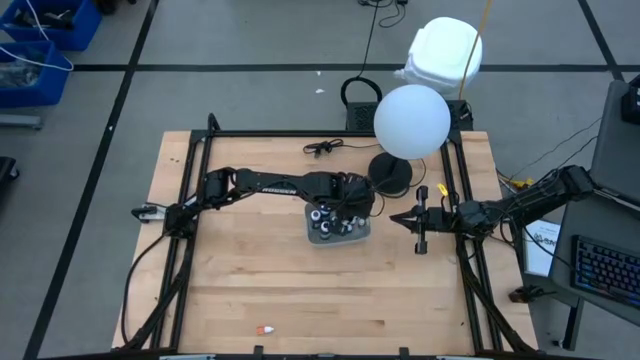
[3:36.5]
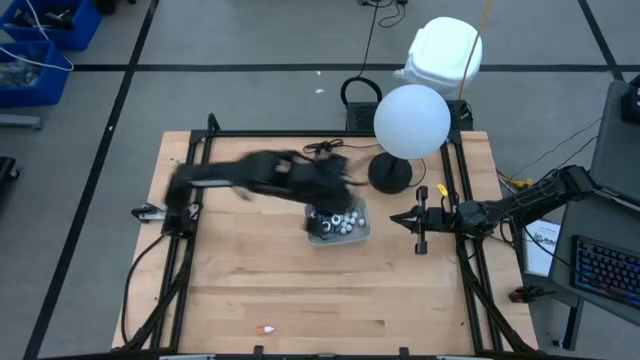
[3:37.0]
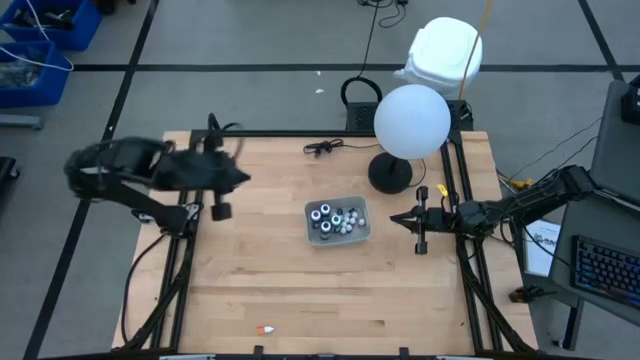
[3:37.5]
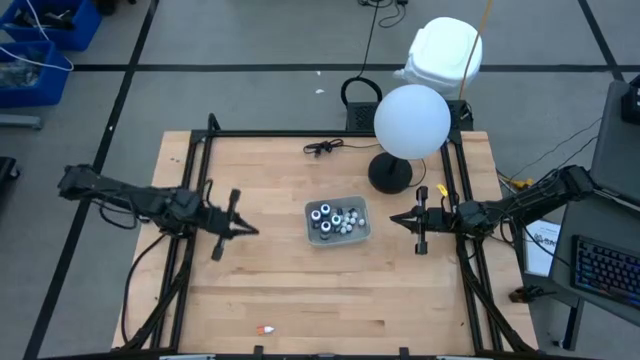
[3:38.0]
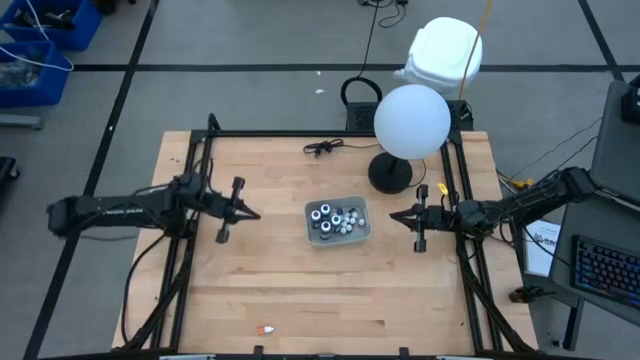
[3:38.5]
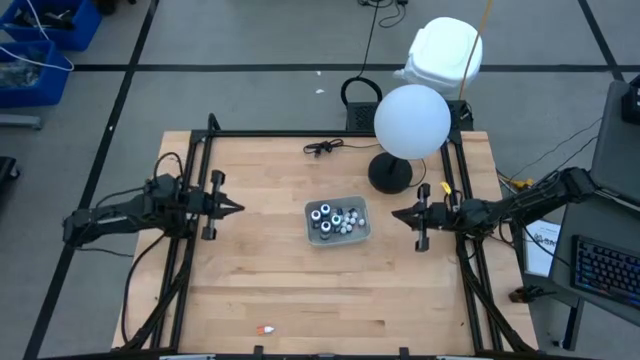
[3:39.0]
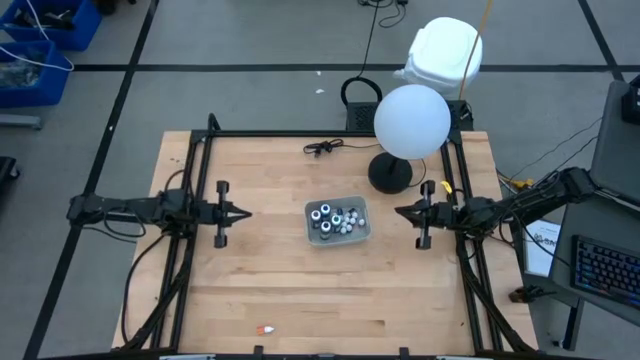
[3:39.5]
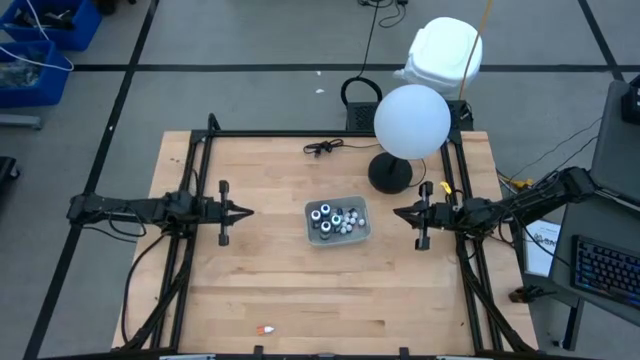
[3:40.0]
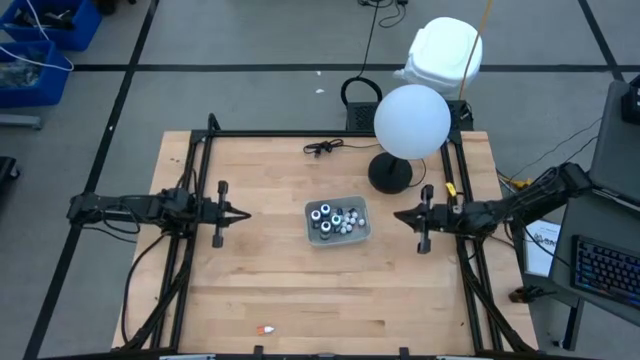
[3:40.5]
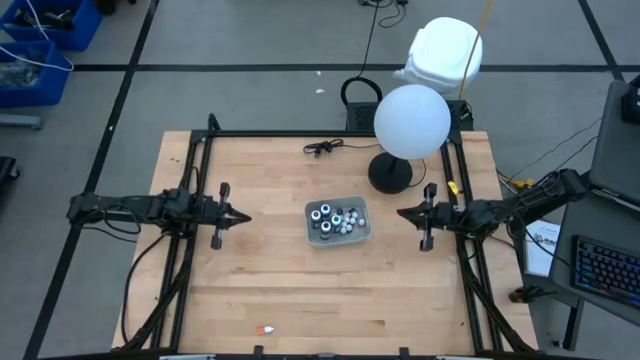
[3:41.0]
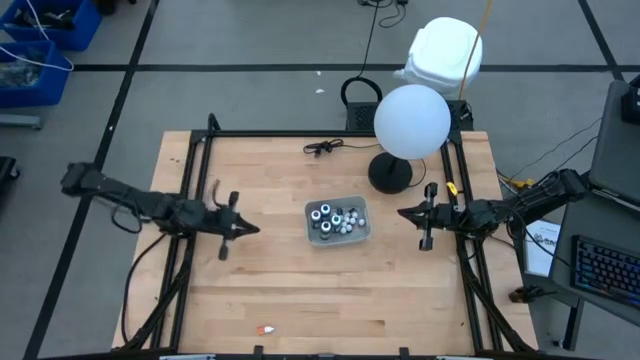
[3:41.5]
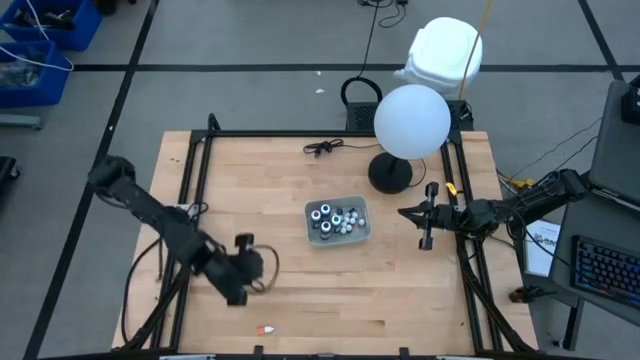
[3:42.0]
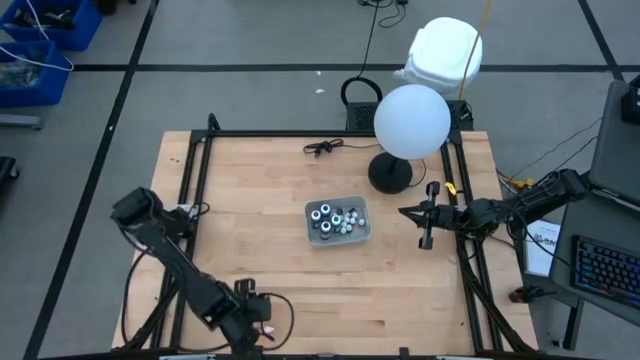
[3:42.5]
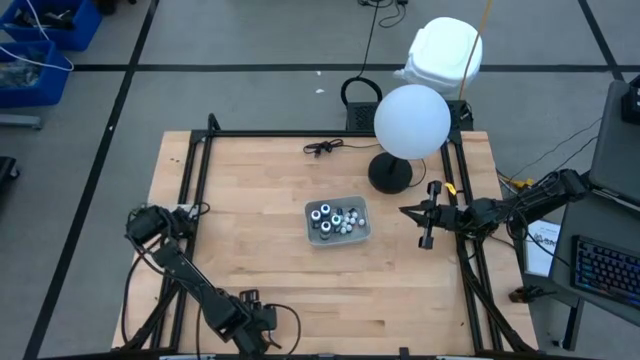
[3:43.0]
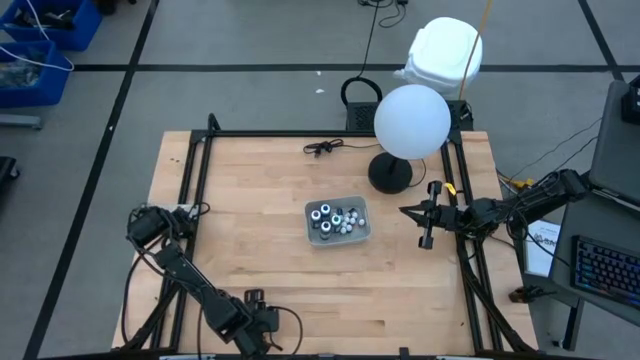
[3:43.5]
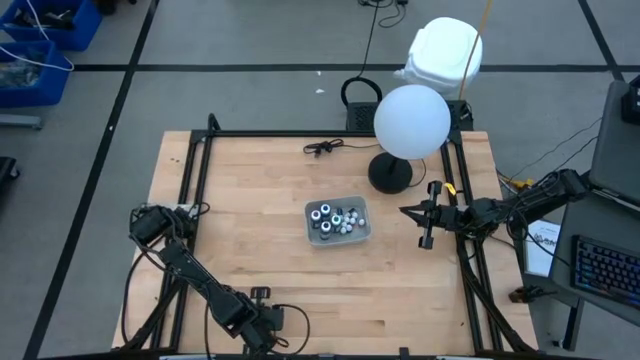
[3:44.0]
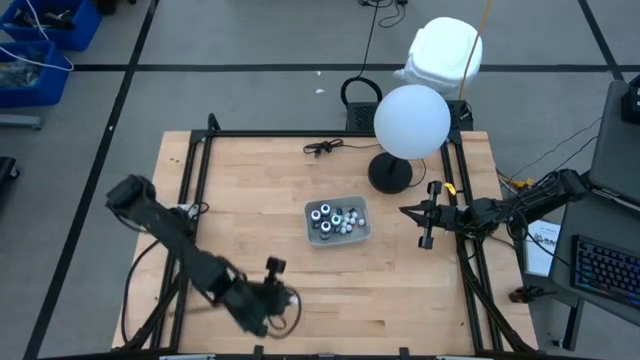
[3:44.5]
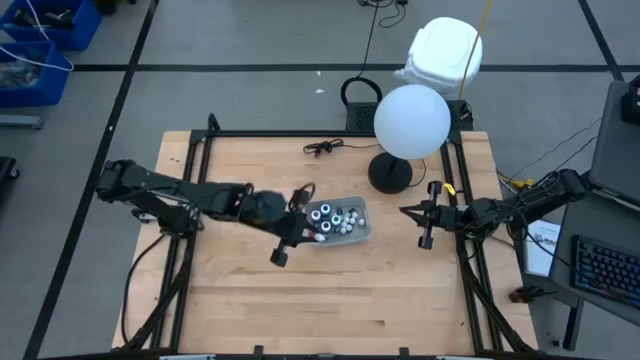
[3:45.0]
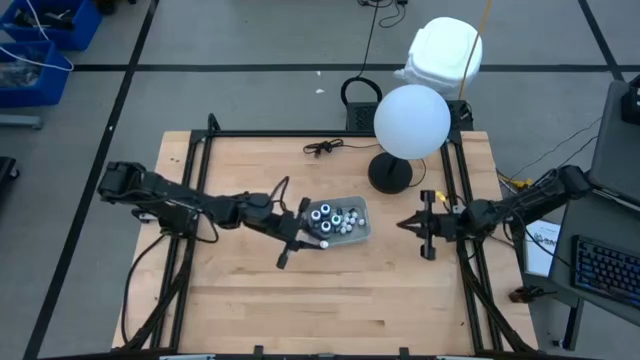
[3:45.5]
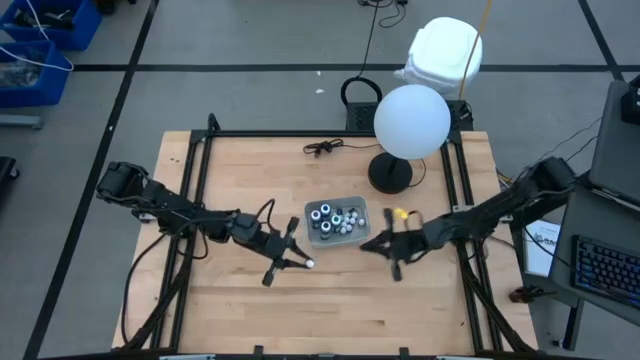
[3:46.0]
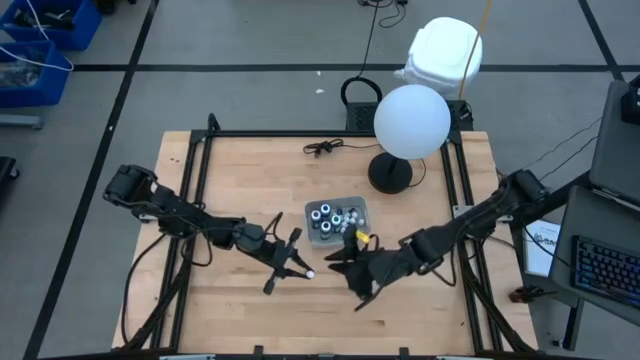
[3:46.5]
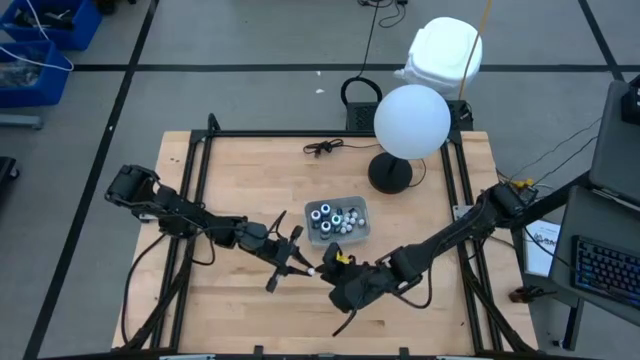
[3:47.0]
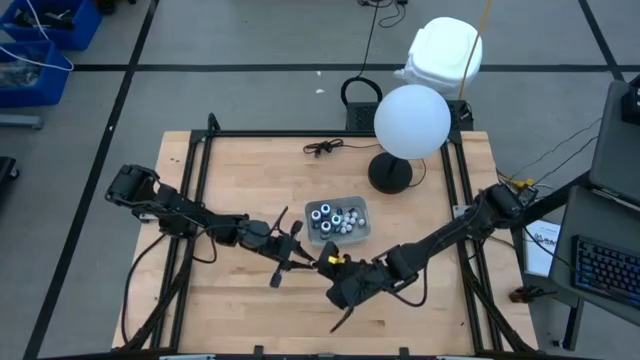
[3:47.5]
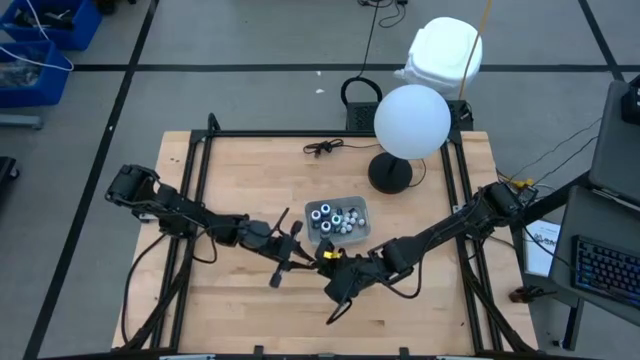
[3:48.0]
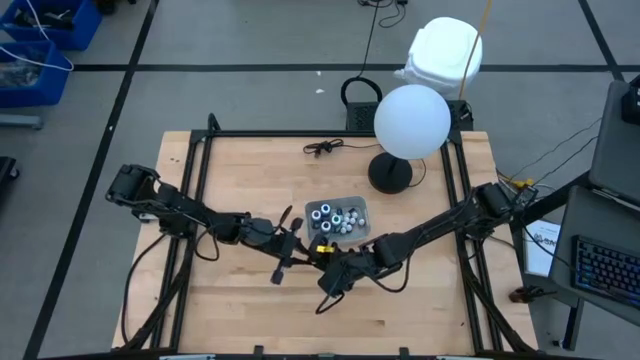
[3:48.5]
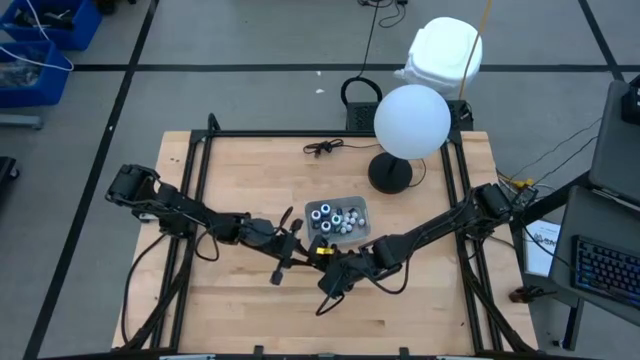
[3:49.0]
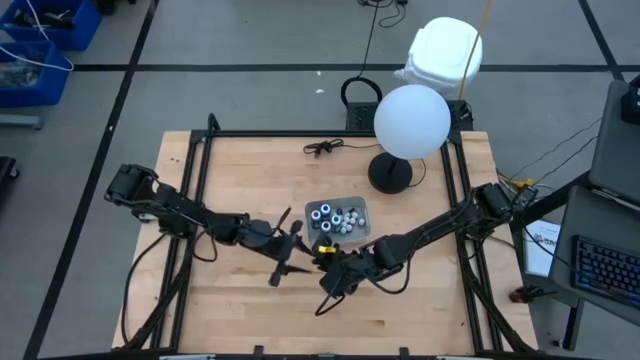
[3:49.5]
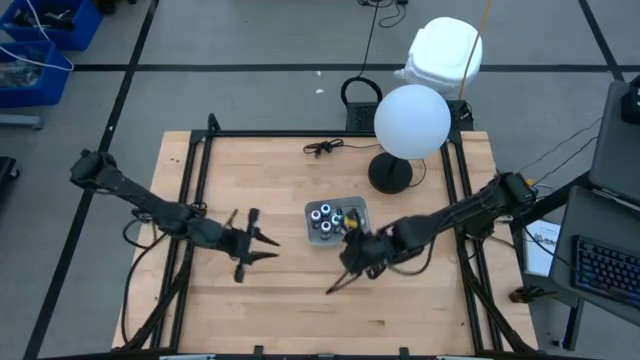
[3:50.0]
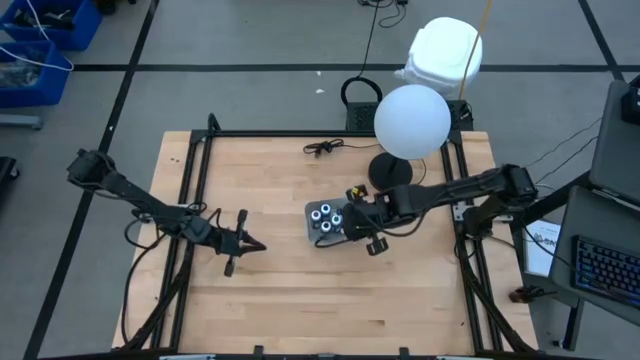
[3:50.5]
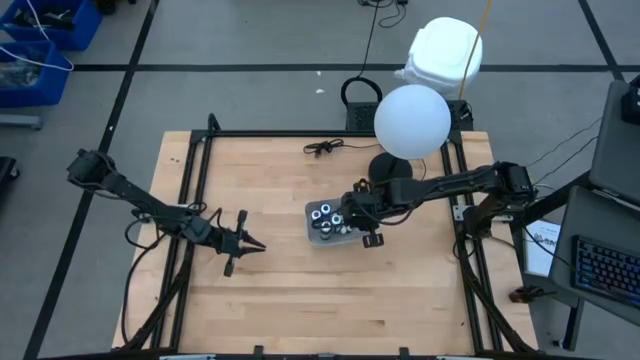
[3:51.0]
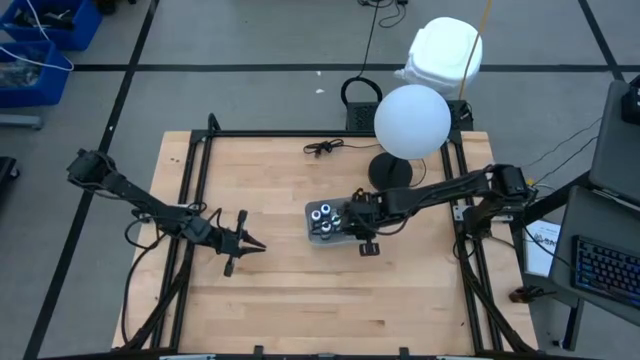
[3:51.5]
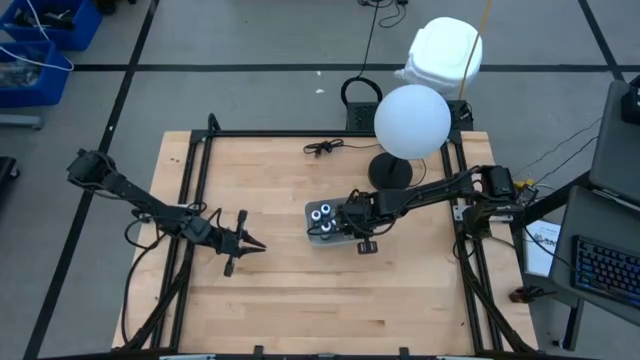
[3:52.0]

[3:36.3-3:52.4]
Task: Pick & Place food coloring
Put the small yellow food coloring bottle into the gray bin

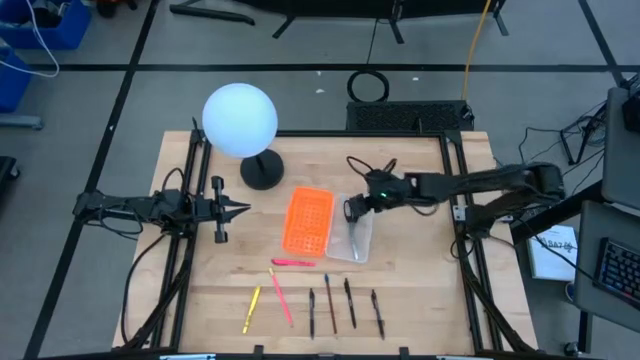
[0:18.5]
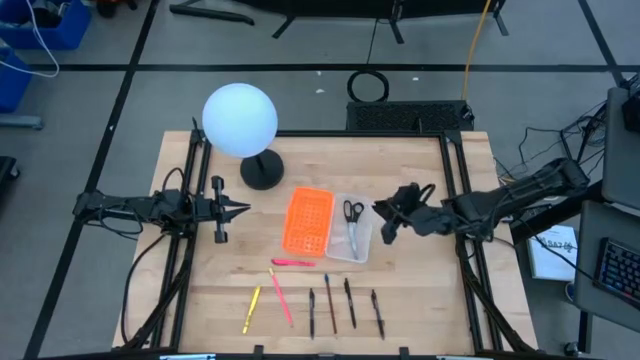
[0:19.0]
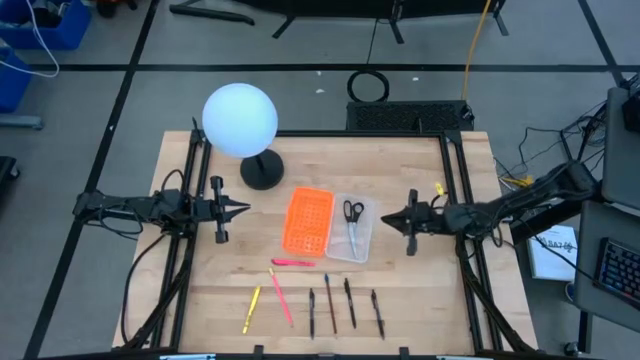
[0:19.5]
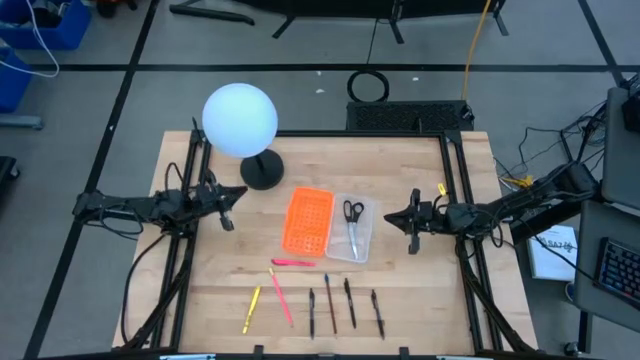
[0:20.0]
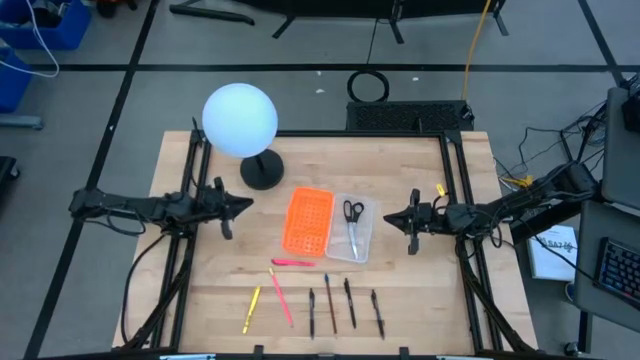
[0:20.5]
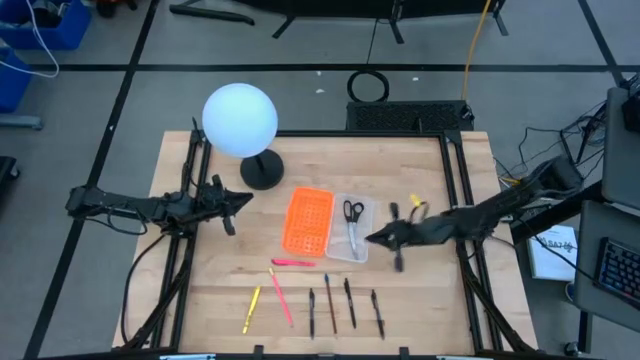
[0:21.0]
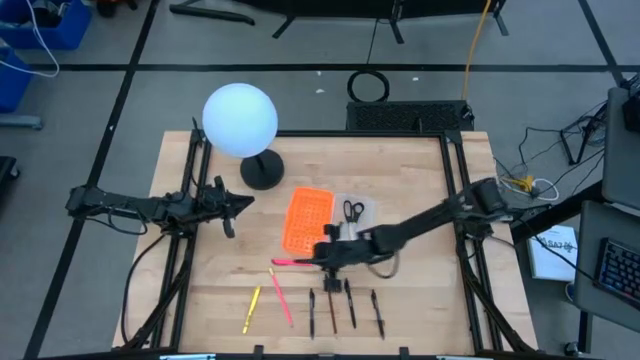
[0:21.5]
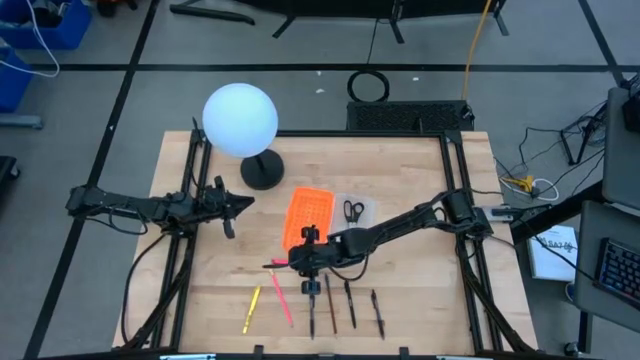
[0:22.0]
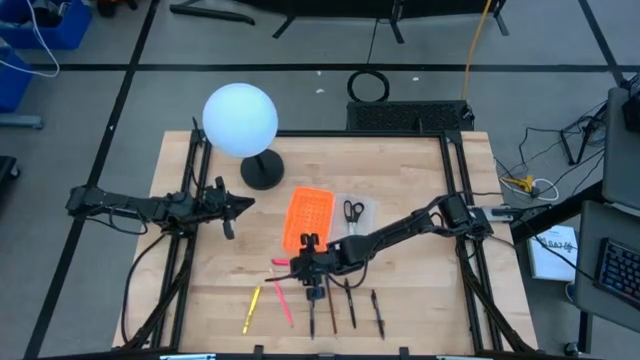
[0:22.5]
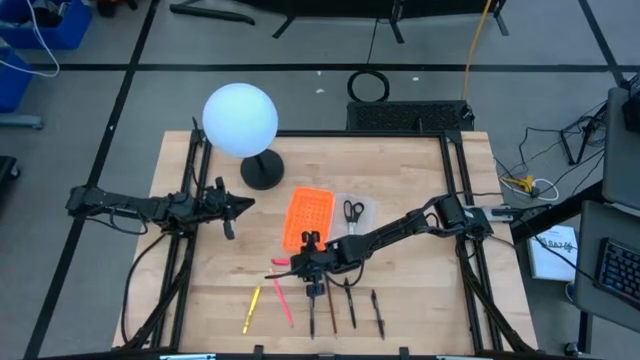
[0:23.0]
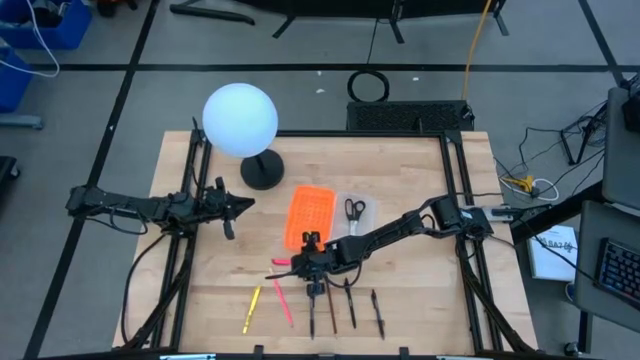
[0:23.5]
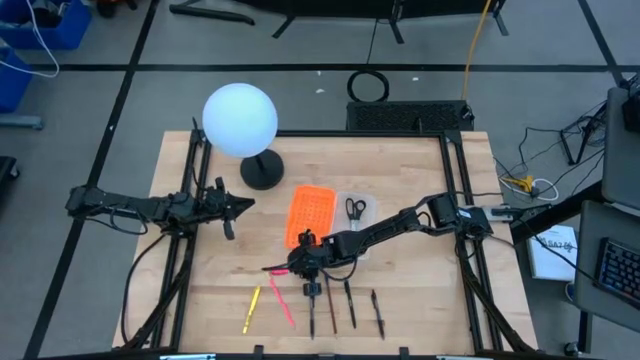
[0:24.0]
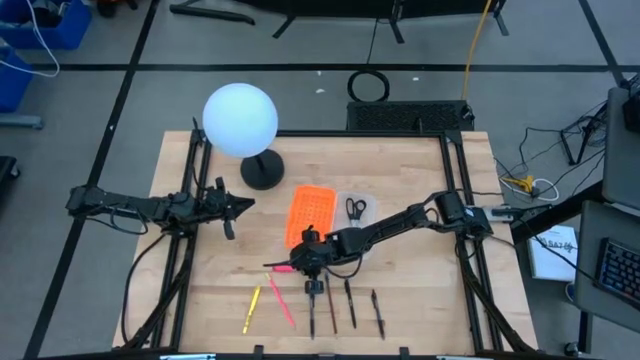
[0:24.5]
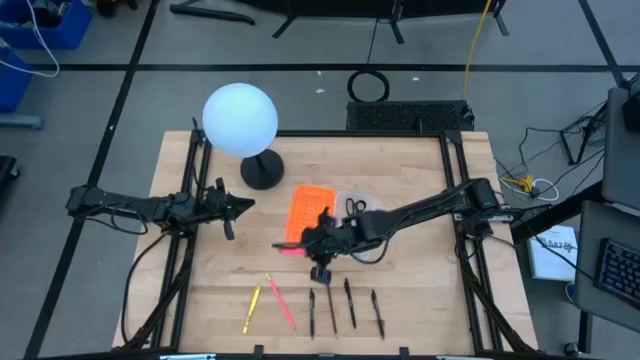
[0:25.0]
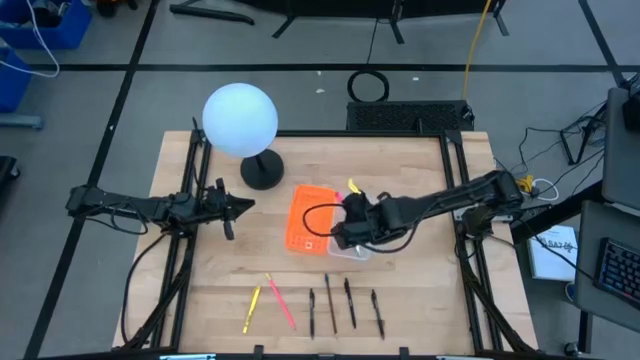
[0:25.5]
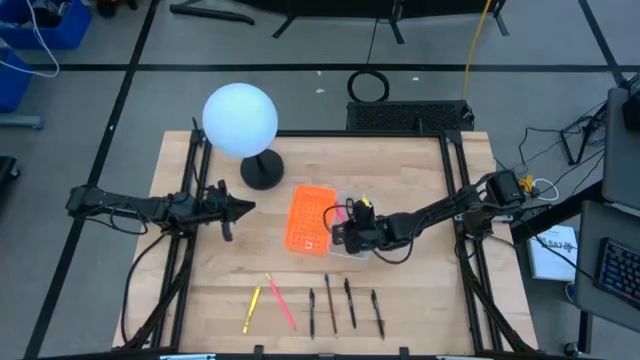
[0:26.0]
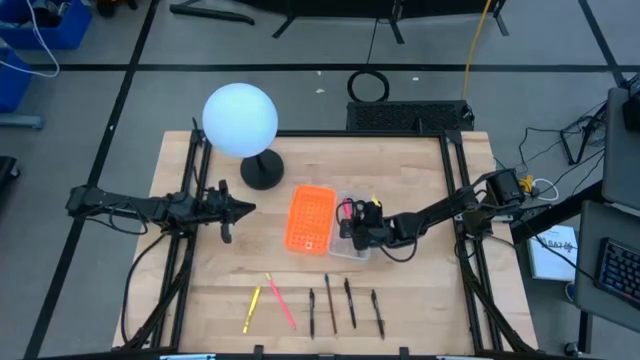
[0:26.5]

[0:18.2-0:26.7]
Task: Pick & place school supplies into a supply box
Put the pink pen into the orange supply box
